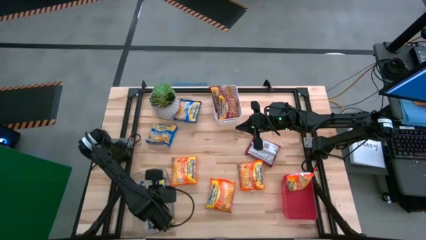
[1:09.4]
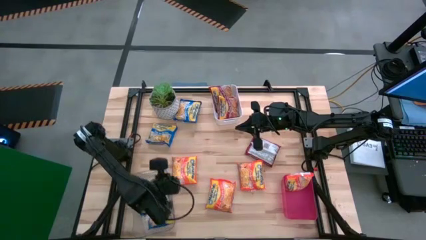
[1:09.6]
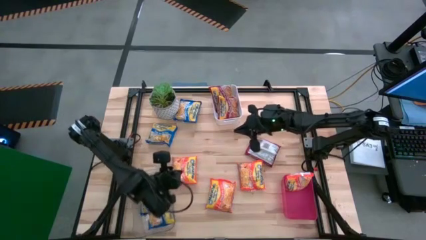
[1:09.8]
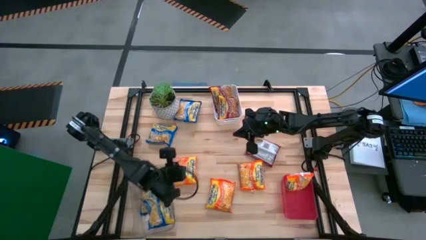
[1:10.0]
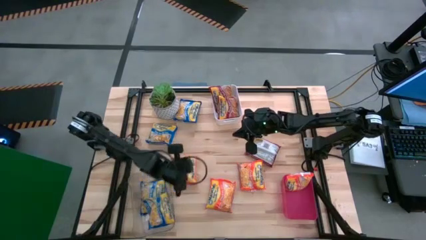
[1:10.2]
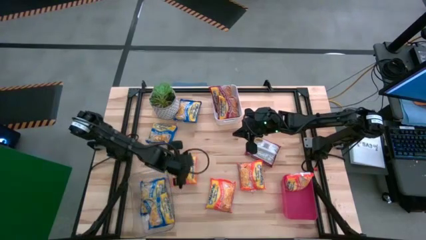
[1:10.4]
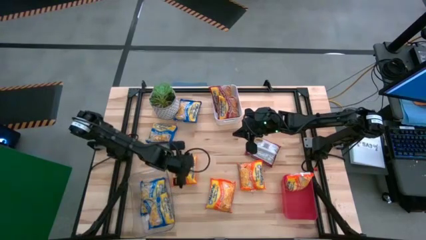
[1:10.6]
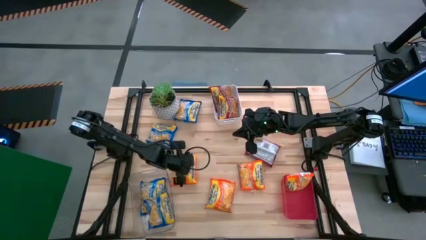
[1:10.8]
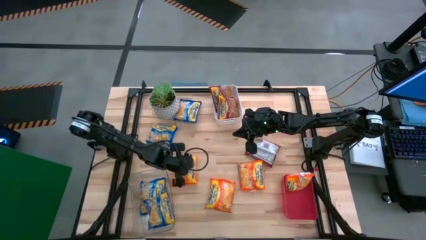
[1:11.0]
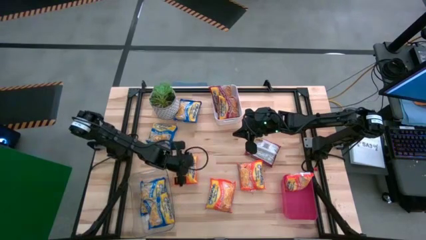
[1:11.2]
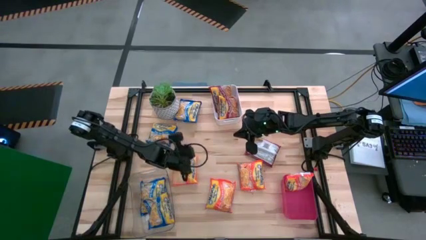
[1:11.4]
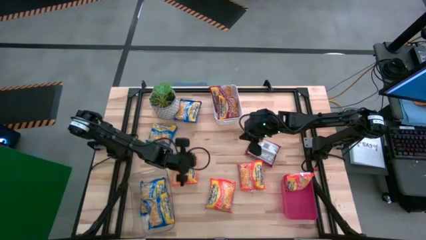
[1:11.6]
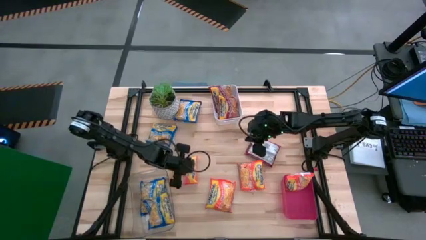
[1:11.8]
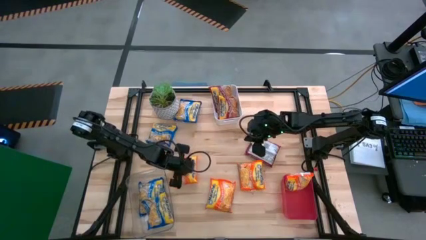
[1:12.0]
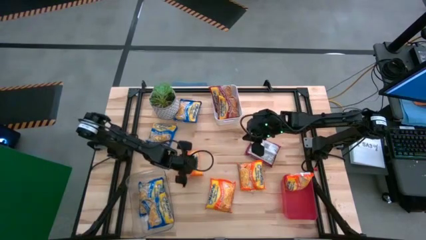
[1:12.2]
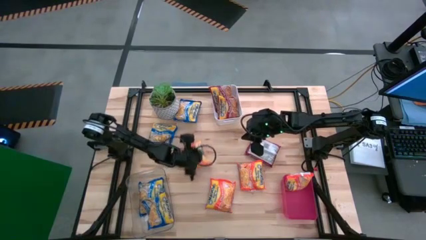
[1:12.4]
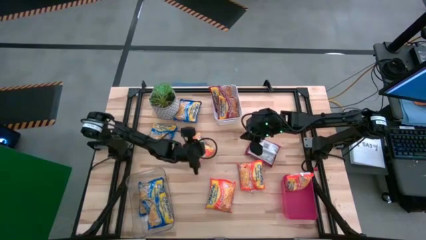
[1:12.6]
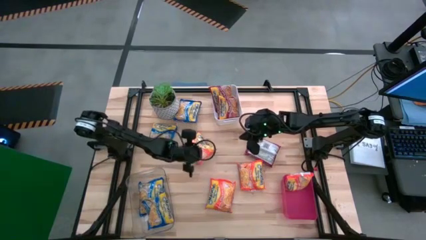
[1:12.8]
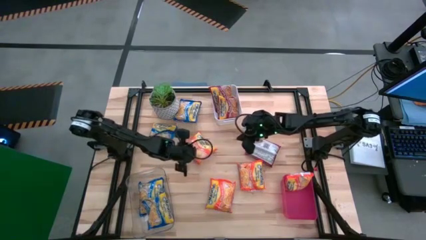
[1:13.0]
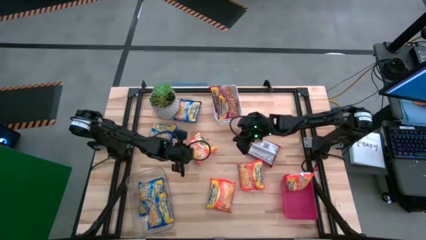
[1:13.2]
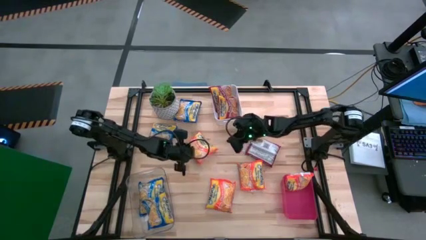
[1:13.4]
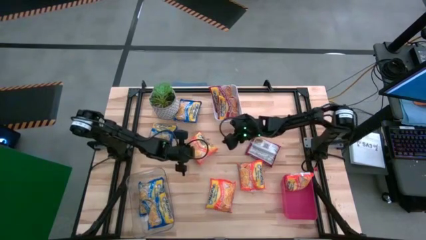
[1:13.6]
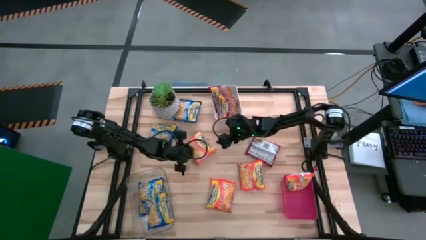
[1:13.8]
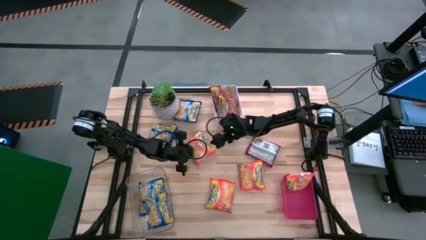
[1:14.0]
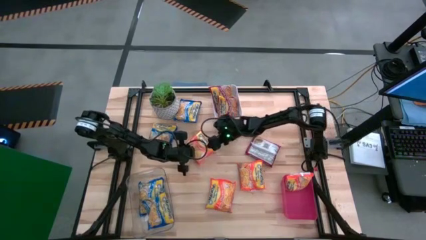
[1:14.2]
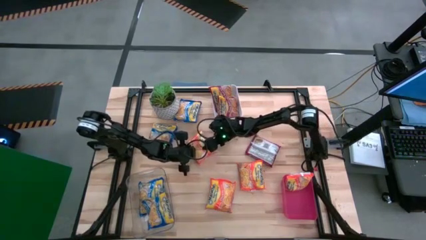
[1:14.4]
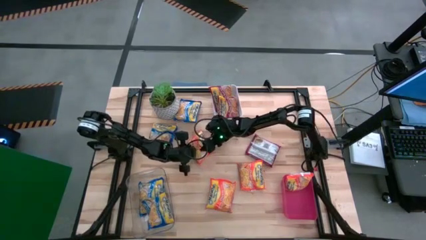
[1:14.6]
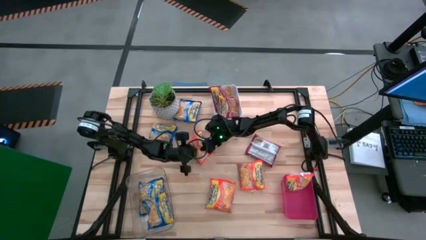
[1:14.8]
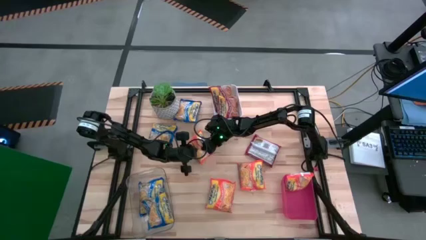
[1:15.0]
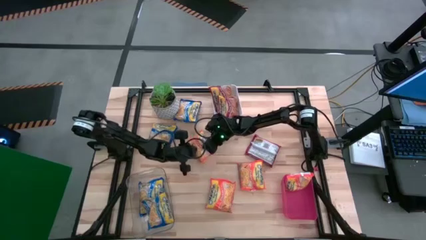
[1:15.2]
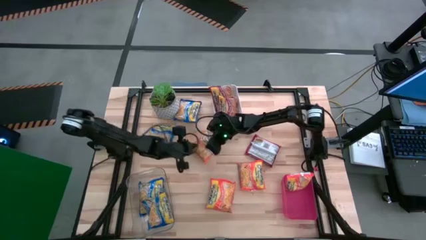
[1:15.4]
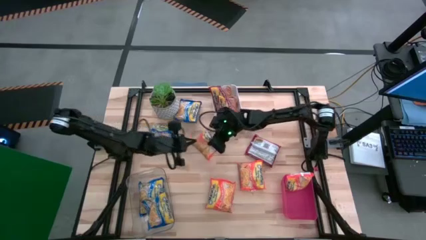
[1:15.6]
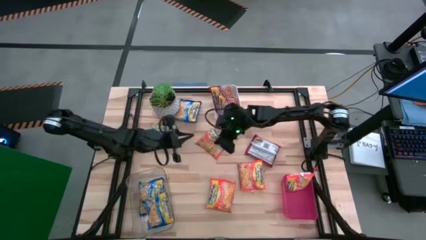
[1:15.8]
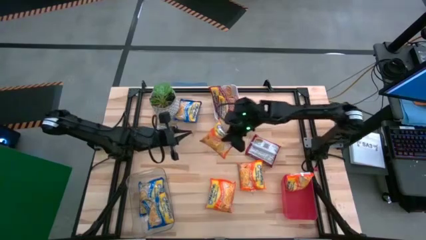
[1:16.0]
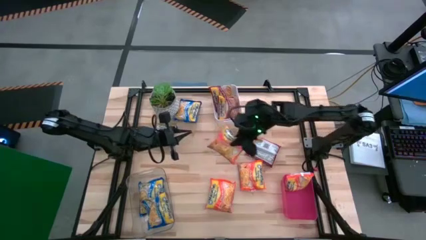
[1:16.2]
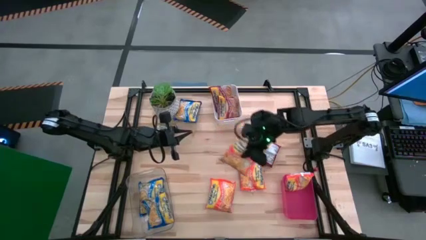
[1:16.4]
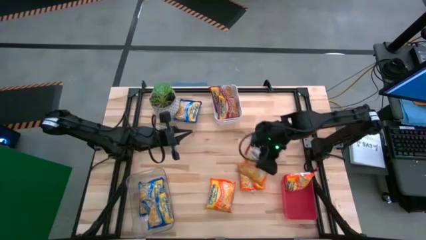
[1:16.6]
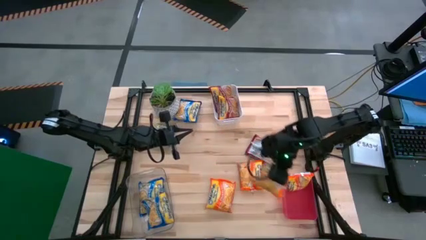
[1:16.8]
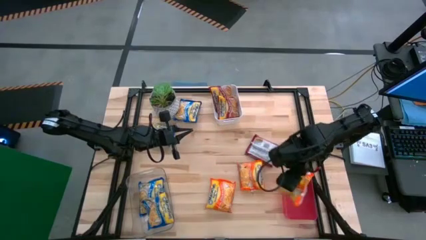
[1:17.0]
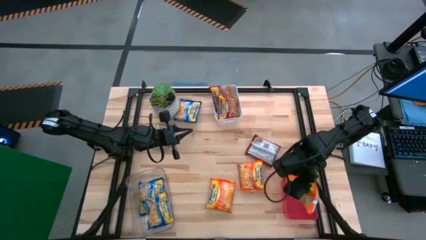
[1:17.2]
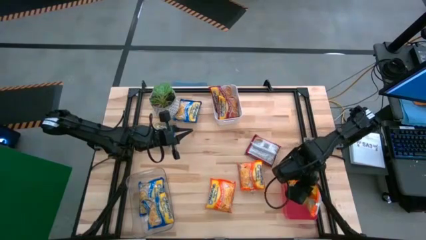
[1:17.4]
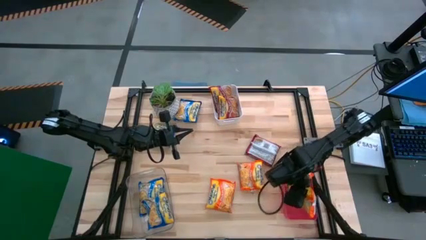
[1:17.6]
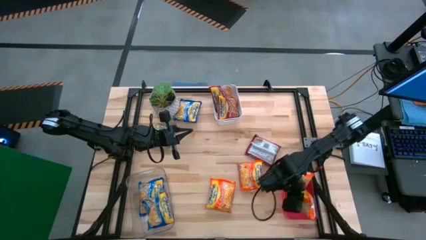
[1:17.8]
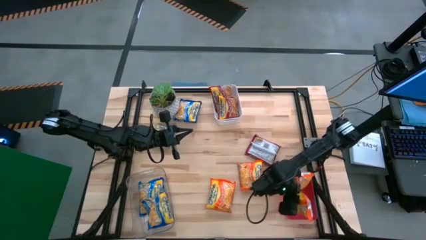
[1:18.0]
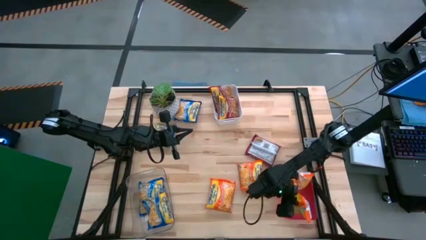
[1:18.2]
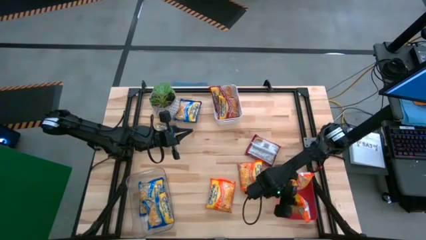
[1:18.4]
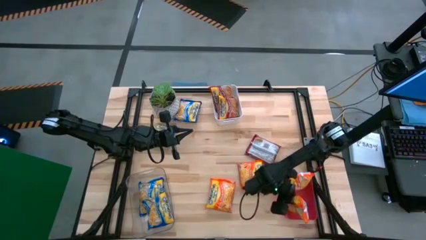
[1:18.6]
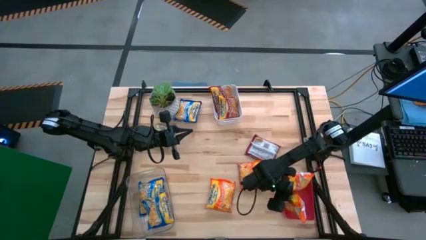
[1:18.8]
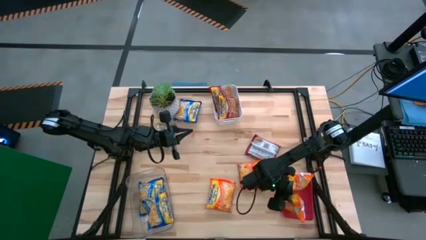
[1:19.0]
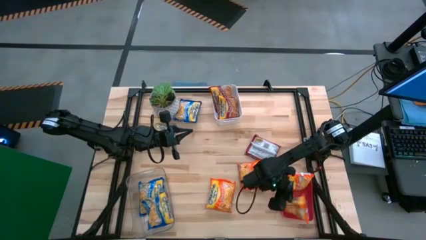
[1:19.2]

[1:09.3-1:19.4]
Task: Sort Maruchan noodles
Put the left orange noodle pack into the pink bin

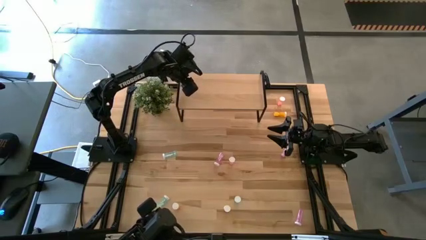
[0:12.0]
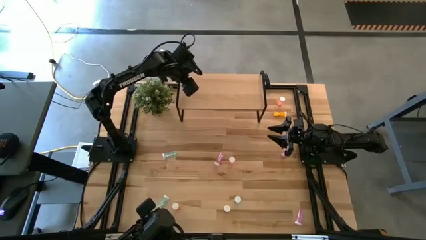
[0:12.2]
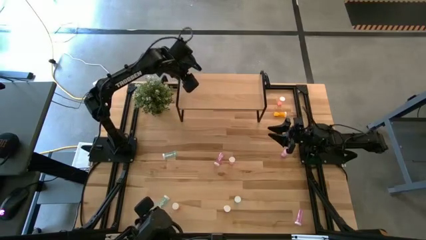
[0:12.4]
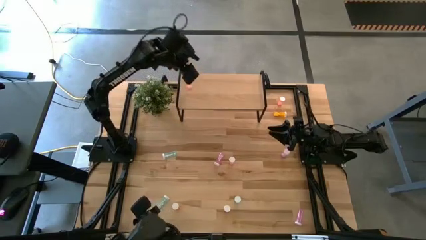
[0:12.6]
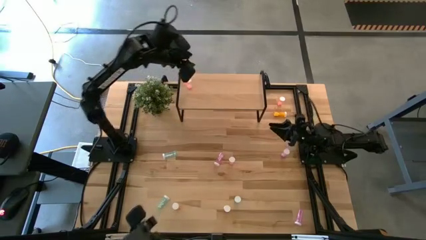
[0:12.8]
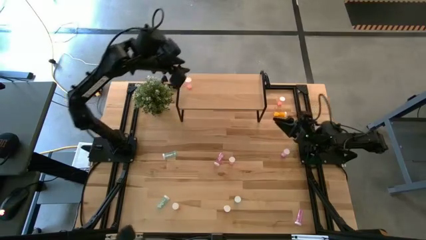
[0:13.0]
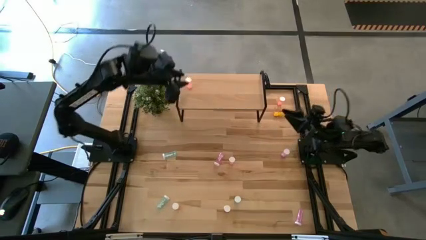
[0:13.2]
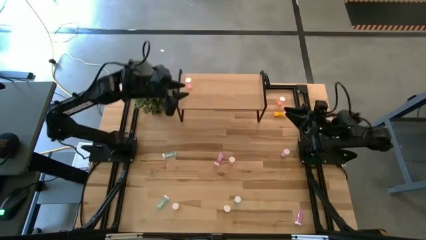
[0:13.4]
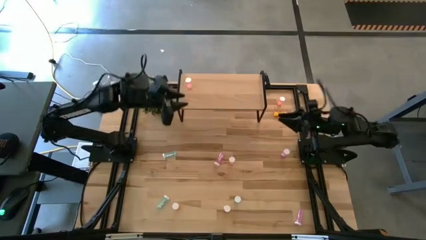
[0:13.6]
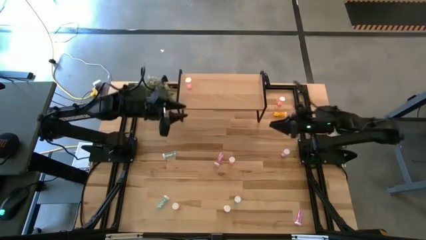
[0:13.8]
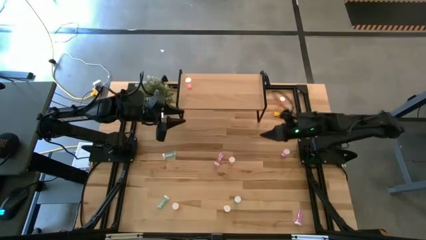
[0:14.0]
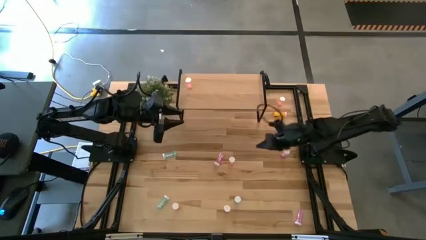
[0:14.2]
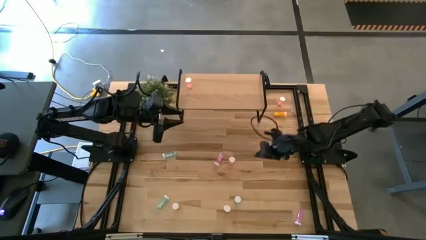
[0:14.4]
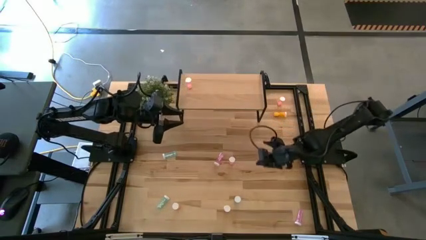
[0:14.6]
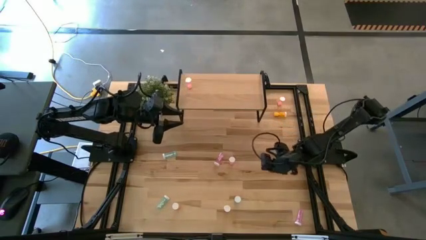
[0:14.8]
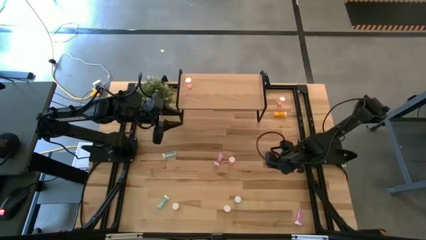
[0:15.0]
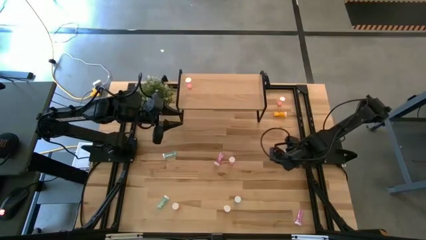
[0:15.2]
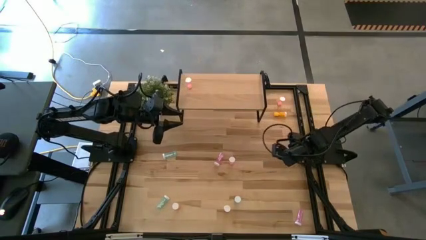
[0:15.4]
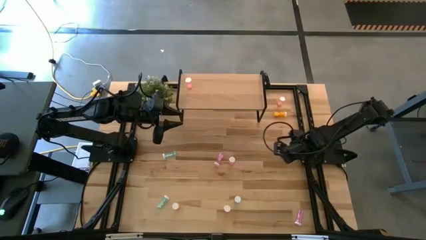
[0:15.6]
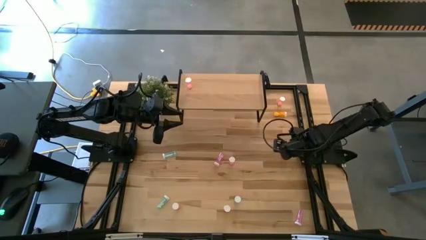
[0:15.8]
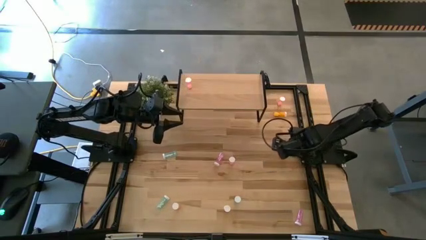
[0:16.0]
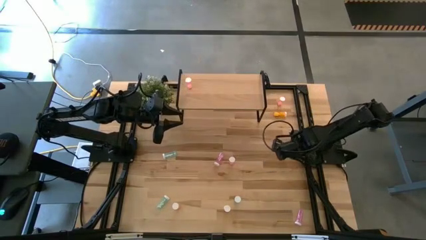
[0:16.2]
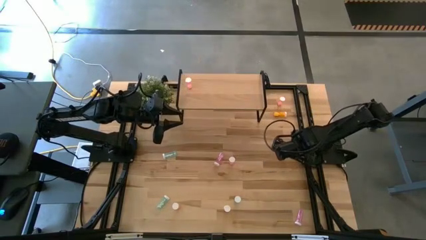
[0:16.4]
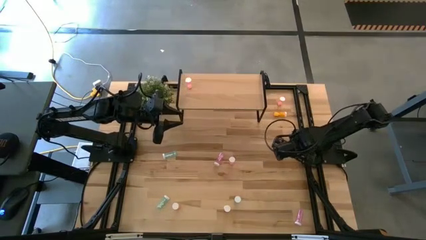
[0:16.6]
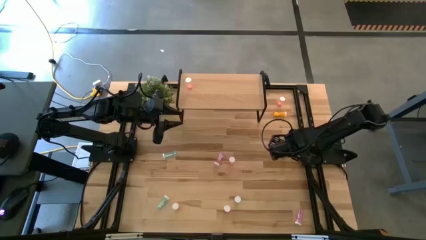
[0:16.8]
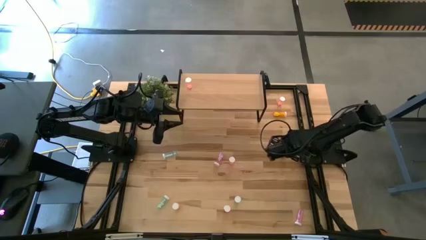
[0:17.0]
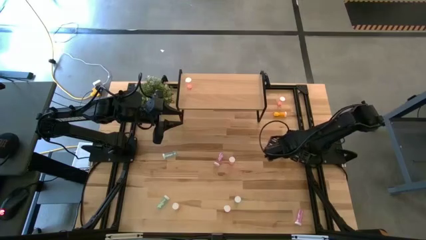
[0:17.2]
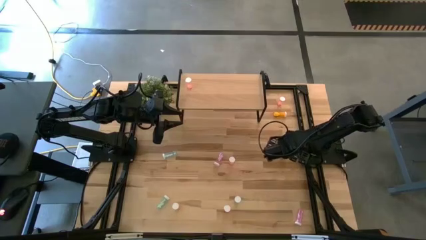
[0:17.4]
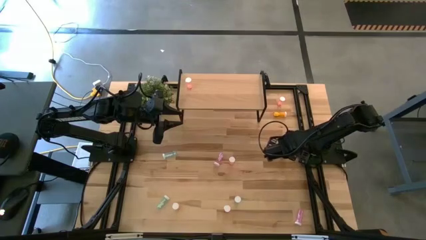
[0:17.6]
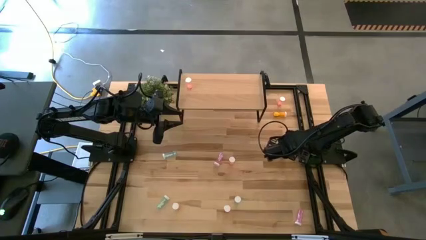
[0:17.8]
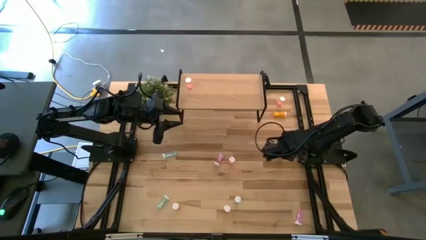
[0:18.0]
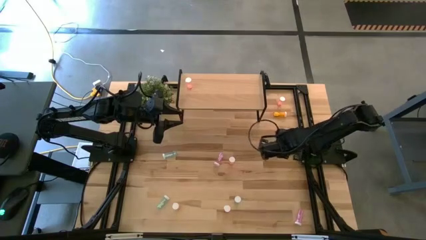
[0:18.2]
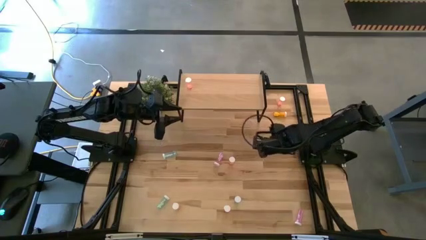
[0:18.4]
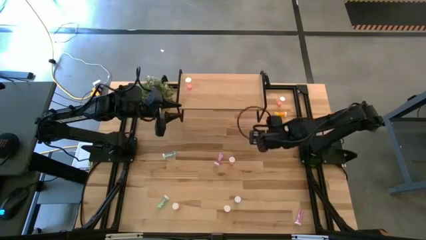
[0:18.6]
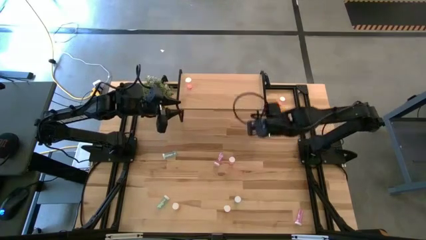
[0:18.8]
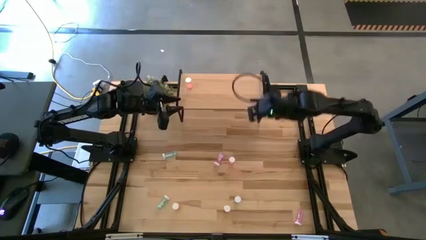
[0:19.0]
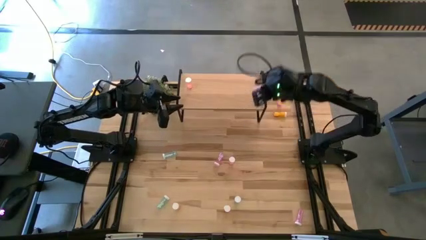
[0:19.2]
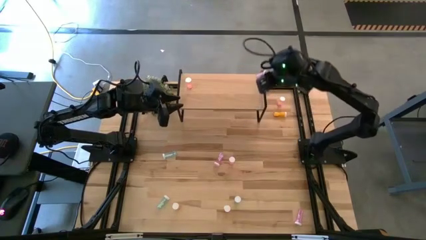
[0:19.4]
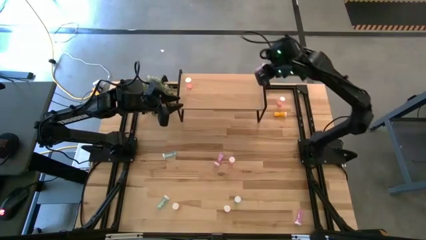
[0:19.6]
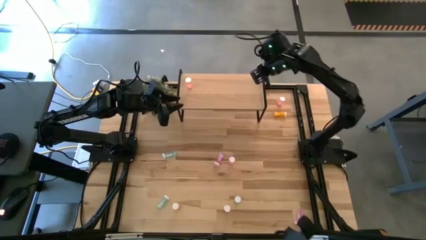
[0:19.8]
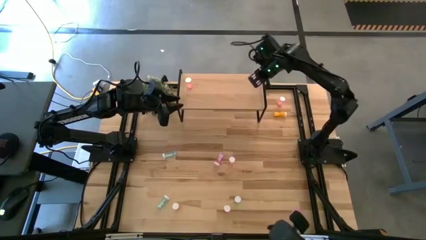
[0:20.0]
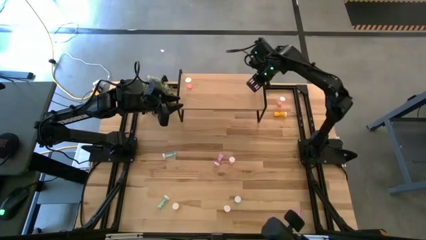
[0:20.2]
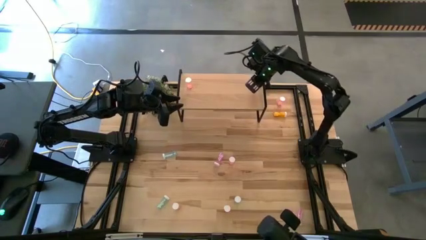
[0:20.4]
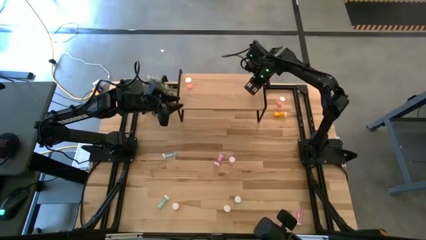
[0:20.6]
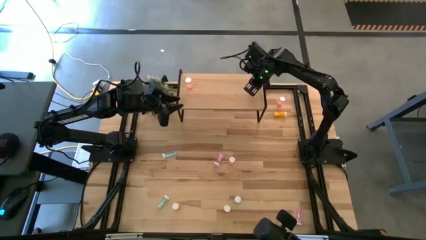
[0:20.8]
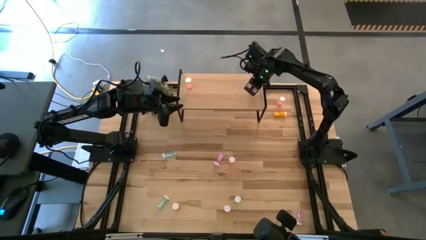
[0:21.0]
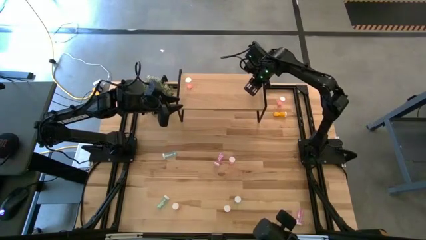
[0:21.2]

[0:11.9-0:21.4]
Task: Pick and place medicine bottles onto shelf by color
Put the top right violet pill bottle on the shelf
